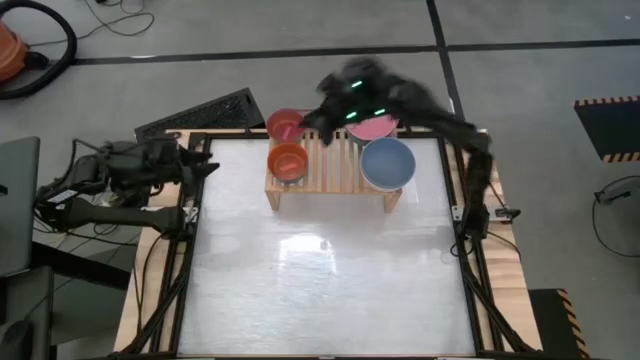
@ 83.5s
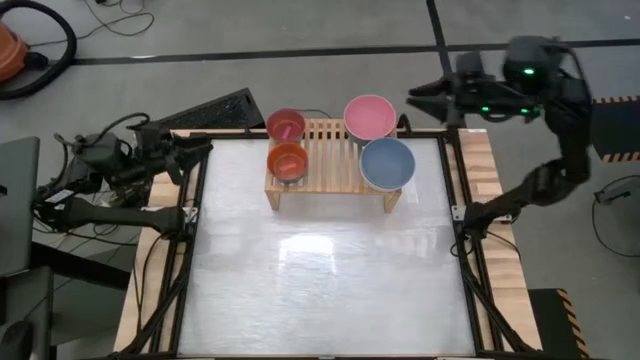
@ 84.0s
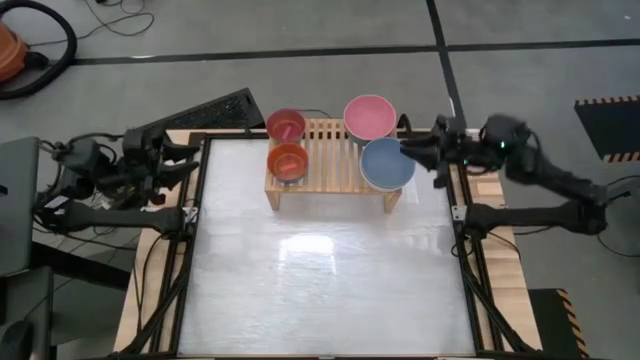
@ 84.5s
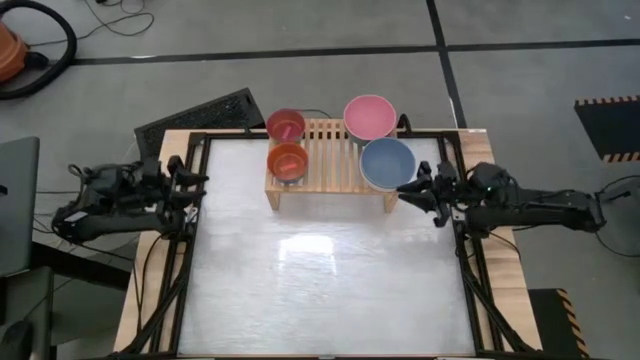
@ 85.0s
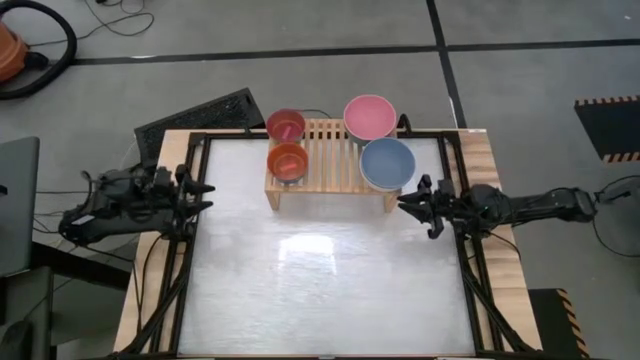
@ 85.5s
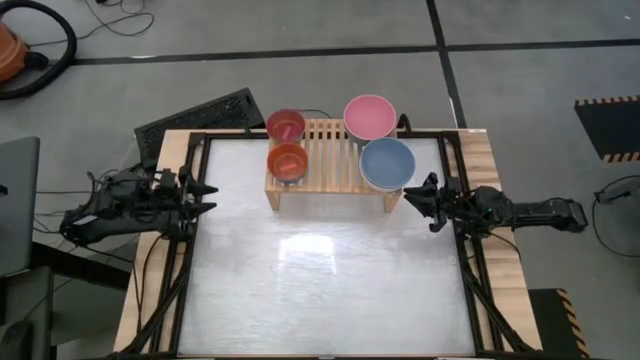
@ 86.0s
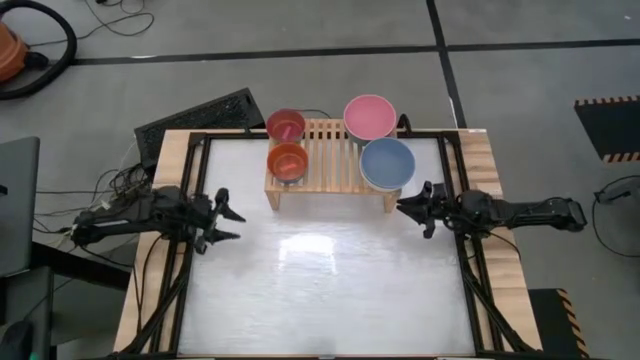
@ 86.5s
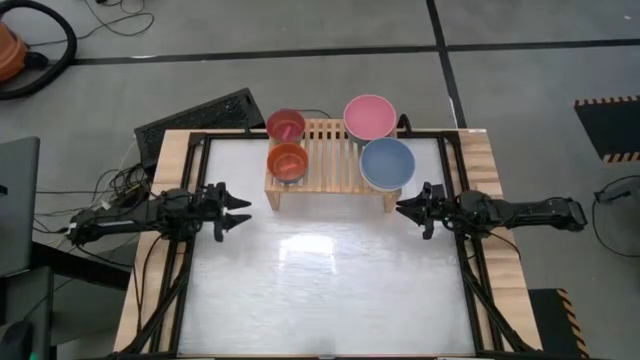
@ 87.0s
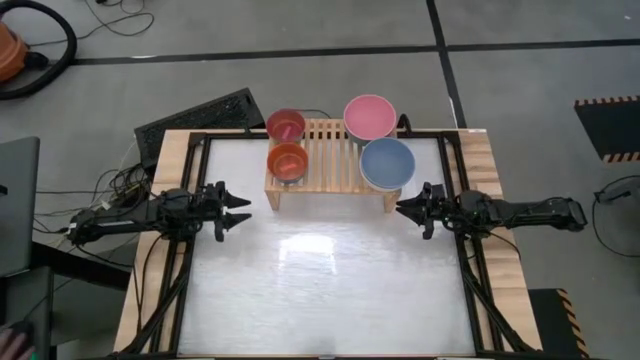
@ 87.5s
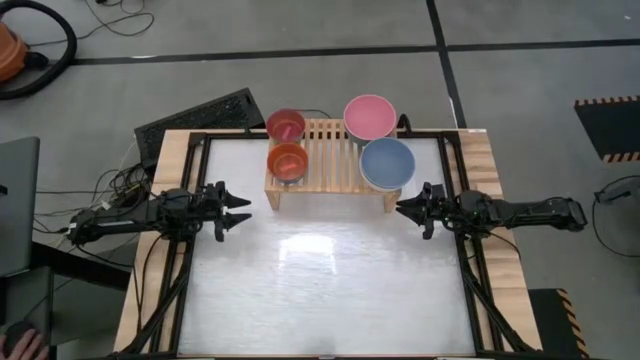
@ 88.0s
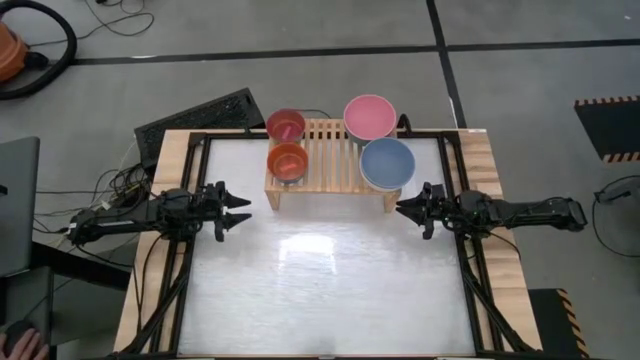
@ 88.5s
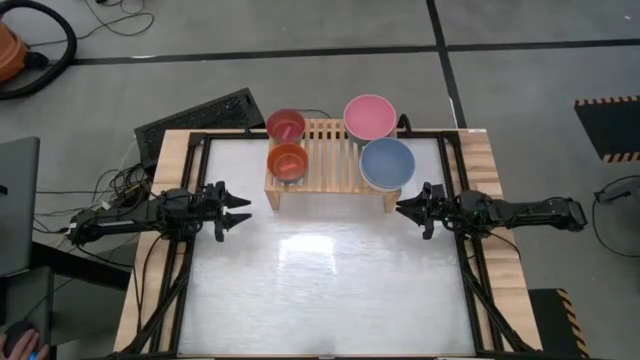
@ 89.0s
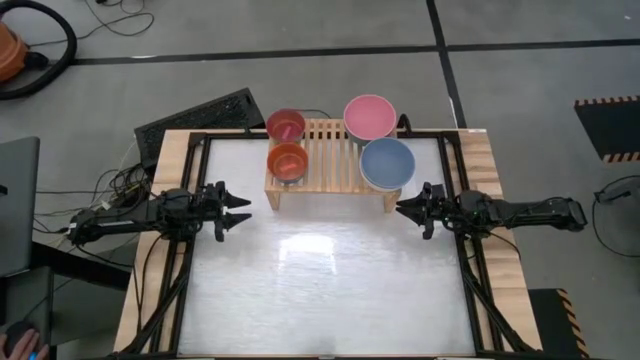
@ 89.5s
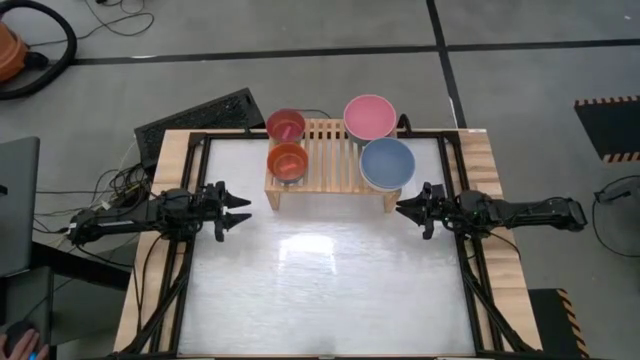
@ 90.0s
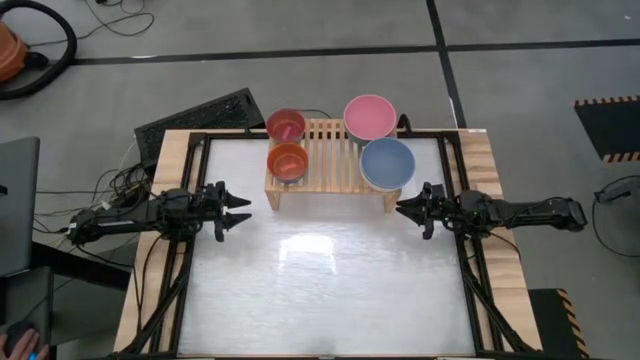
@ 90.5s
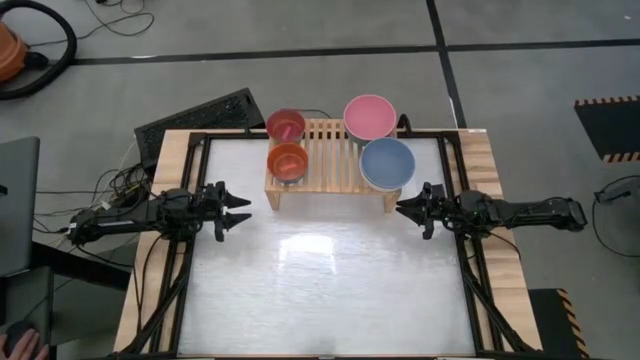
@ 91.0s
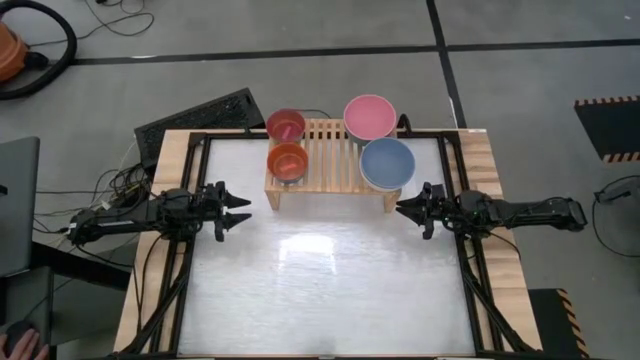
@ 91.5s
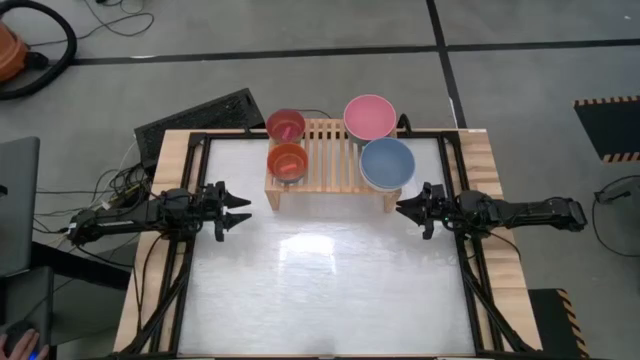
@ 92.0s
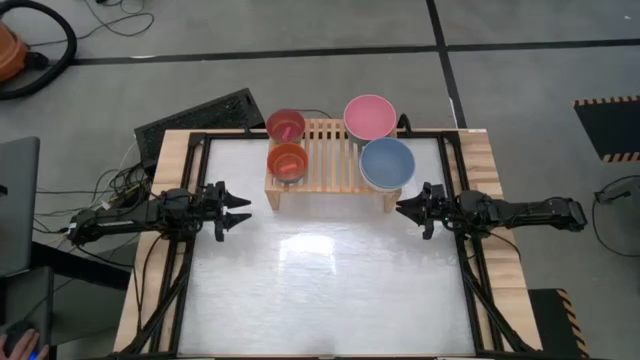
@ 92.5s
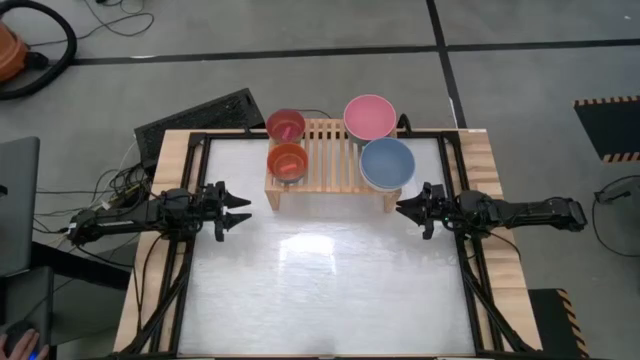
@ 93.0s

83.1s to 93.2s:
Task: Place and stack bowls onto a shelf
Return to Home Position

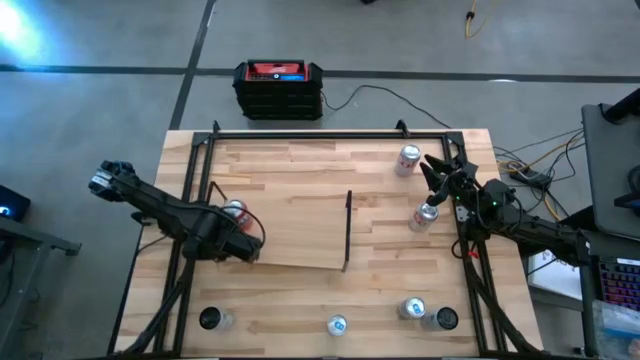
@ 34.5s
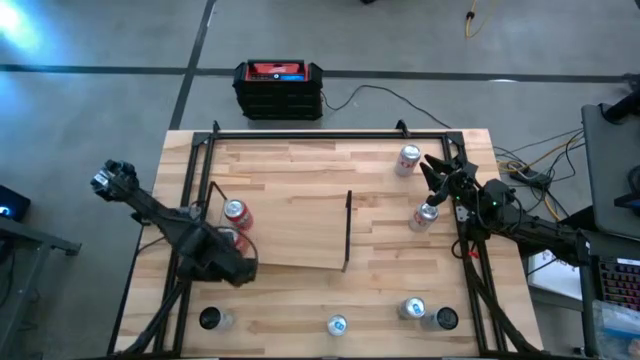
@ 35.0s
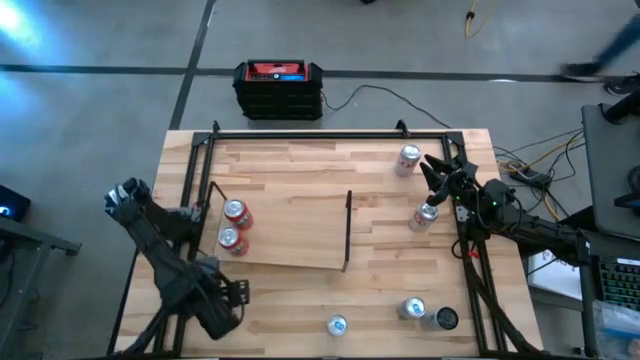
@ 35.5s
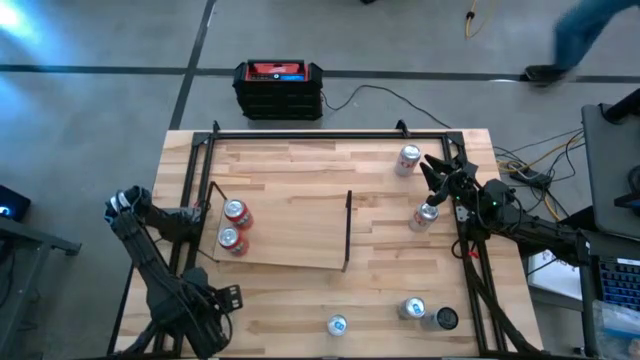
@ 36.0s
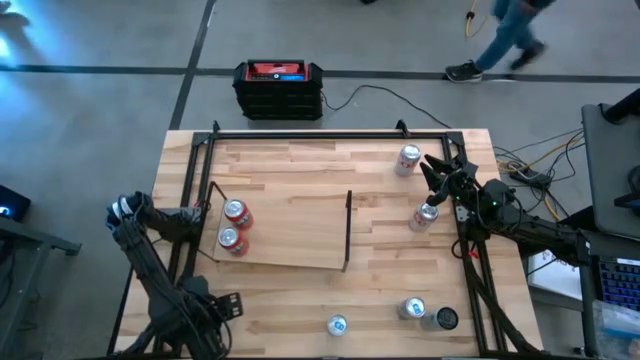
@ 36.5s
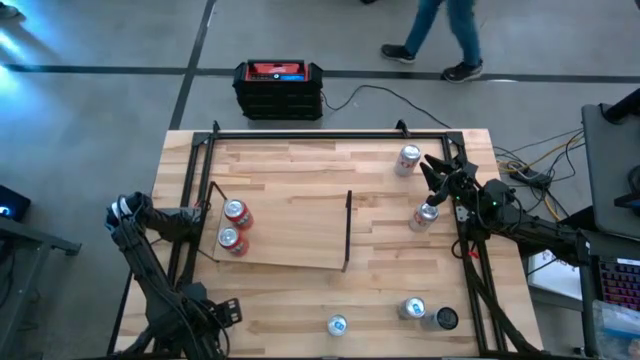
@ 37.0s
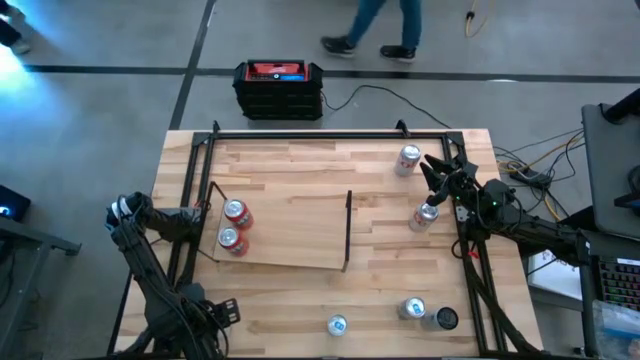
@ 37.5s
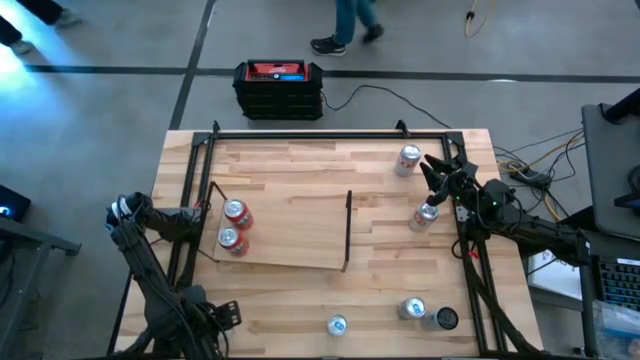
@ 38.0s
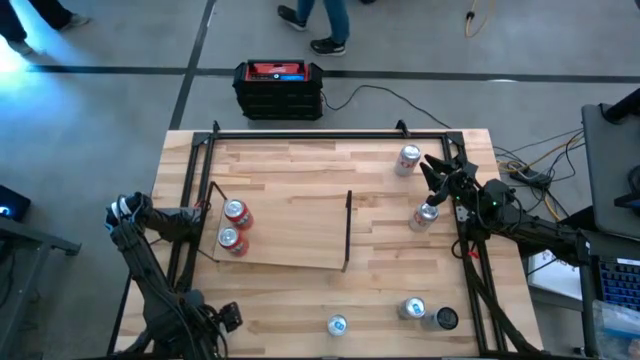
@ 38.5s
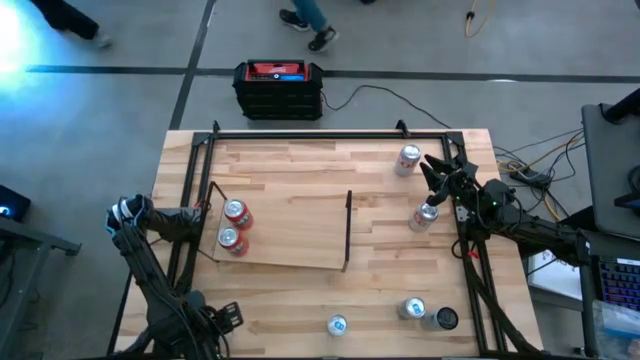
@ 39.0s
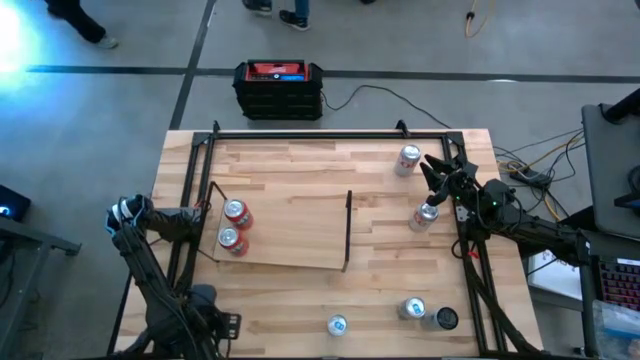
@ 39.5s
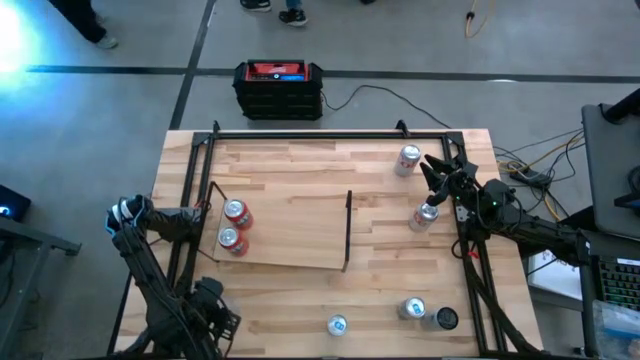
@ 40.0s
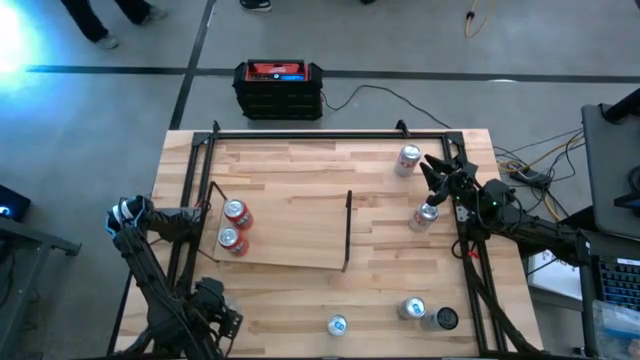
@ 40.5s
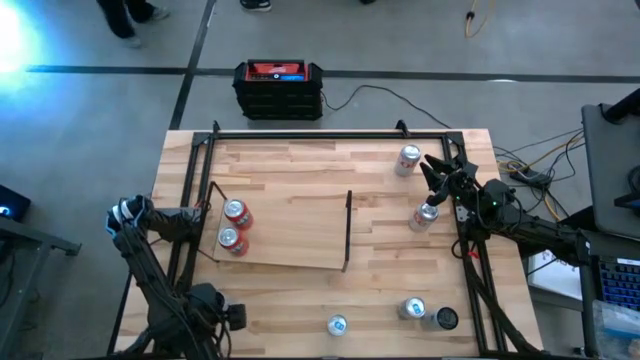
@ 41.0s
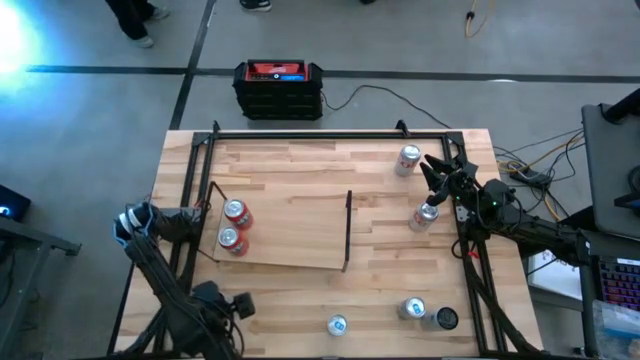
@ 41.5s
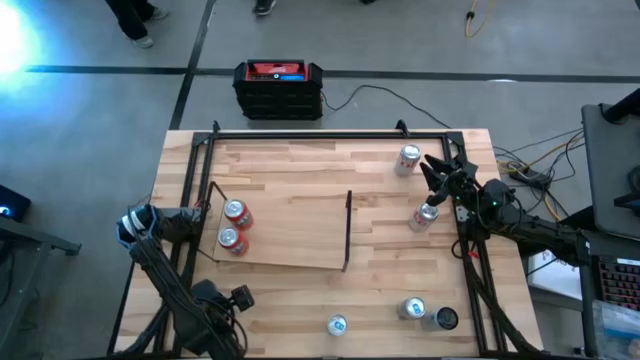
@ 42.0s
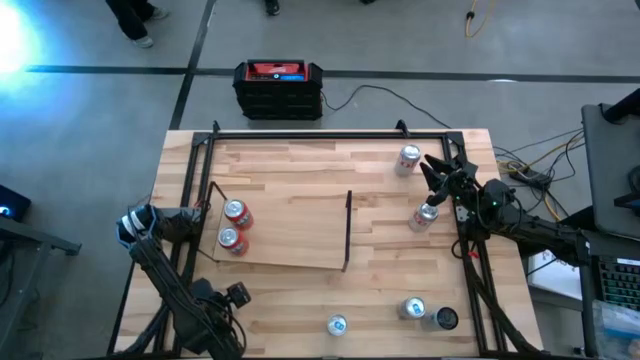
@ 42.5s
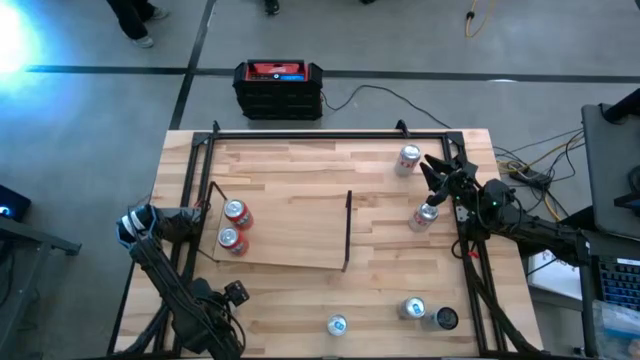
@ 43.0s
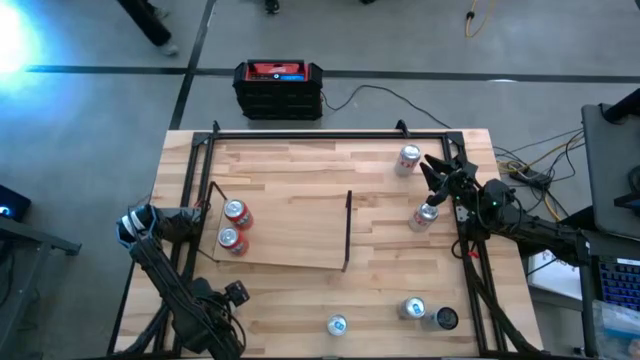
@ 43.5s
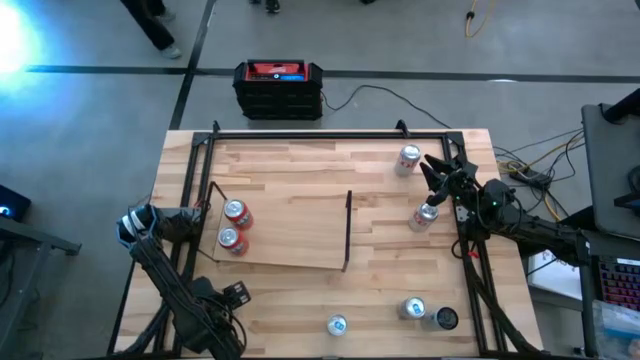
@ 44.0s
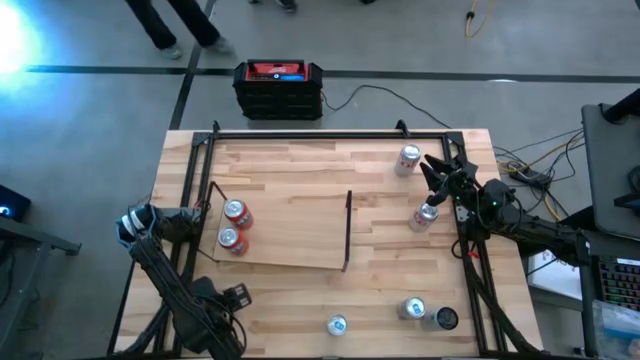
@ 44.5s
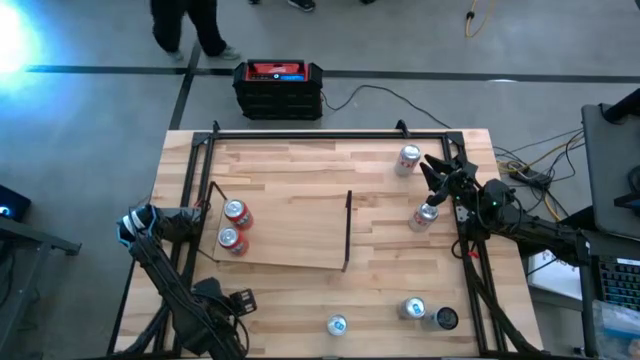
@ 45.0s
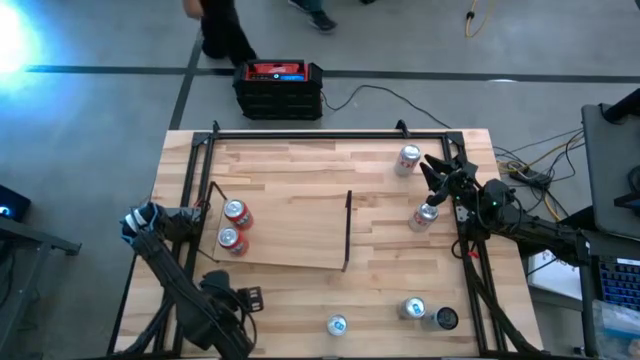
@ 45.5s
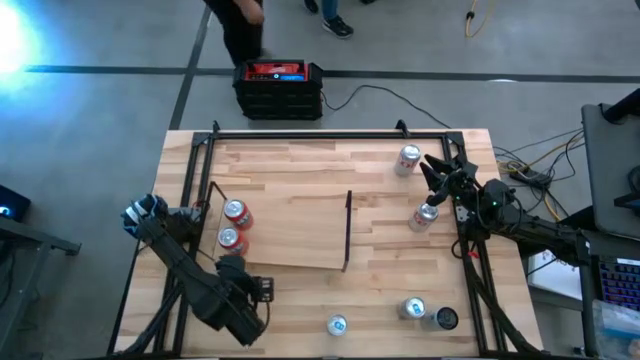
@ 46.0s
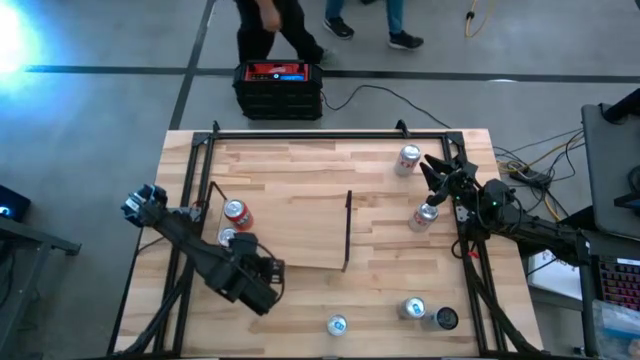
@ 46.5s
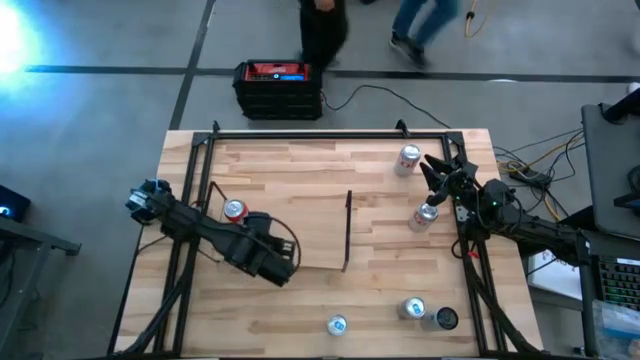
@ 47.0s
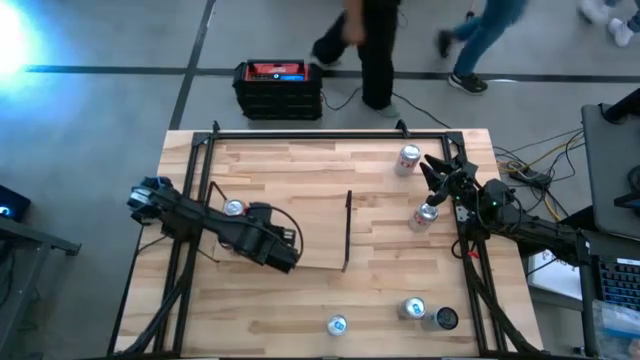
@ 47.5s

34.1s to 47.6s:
Task: Place canned beverage on shelf
Put the left white pink soda can on the shelf
